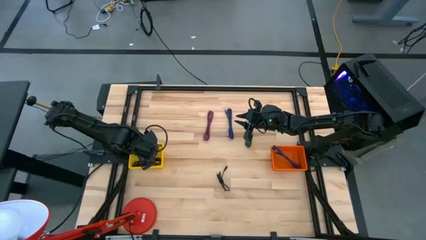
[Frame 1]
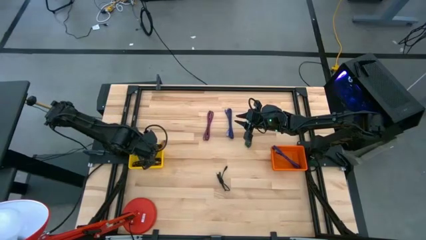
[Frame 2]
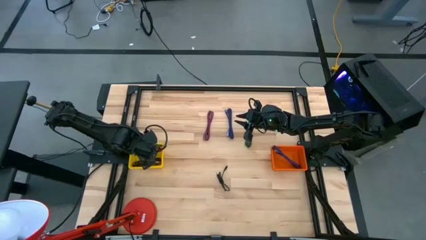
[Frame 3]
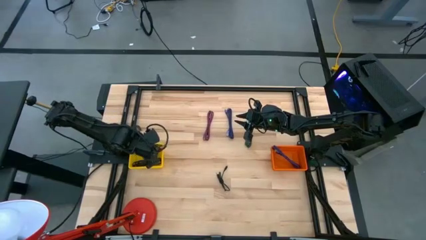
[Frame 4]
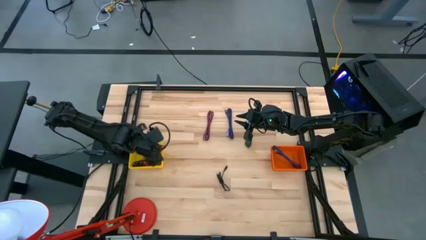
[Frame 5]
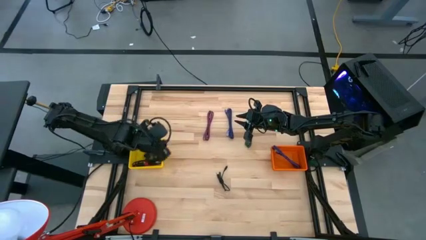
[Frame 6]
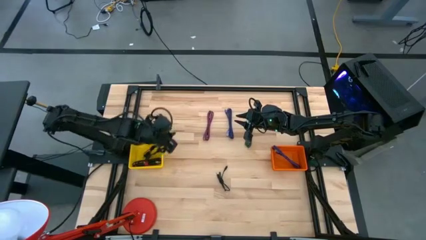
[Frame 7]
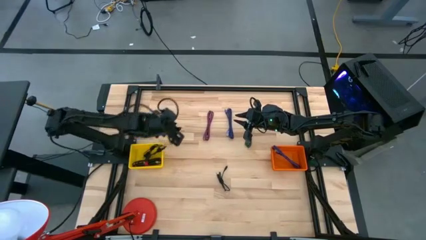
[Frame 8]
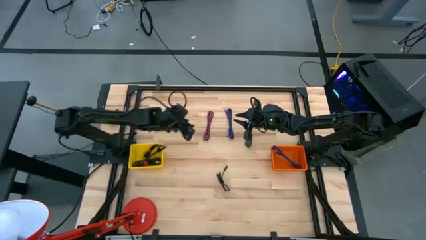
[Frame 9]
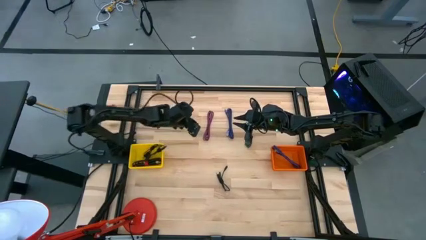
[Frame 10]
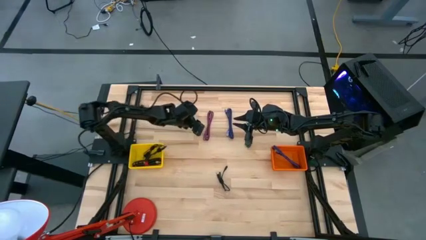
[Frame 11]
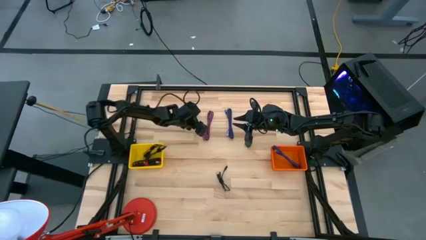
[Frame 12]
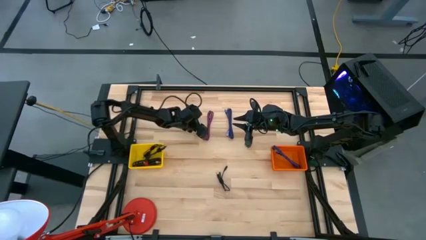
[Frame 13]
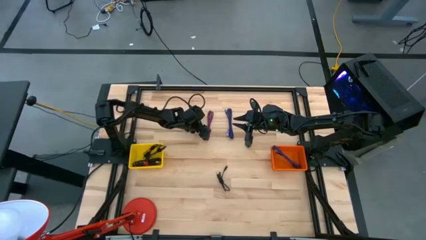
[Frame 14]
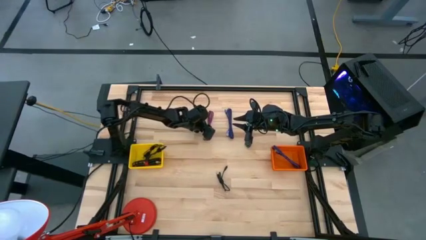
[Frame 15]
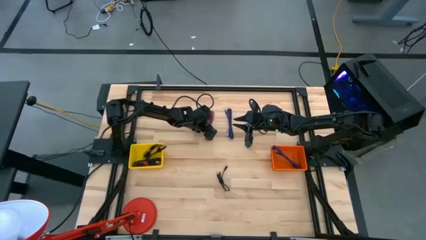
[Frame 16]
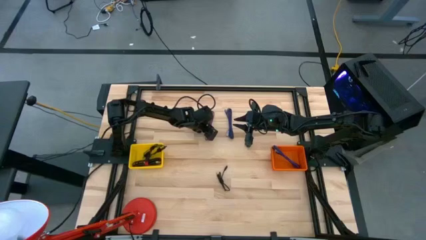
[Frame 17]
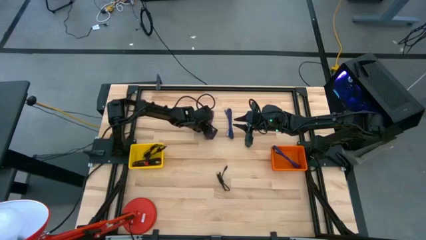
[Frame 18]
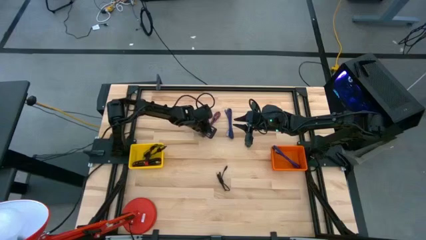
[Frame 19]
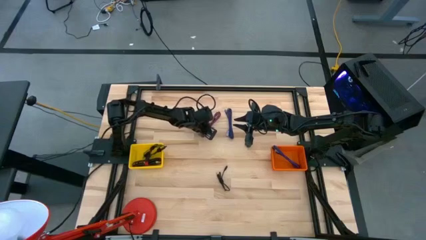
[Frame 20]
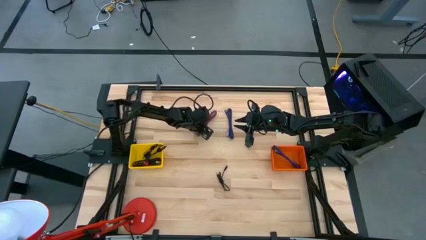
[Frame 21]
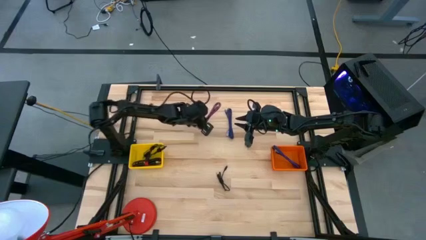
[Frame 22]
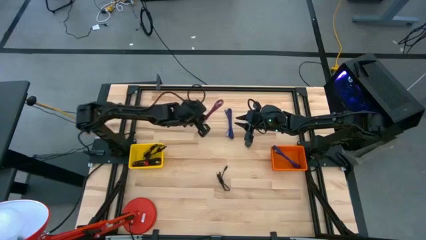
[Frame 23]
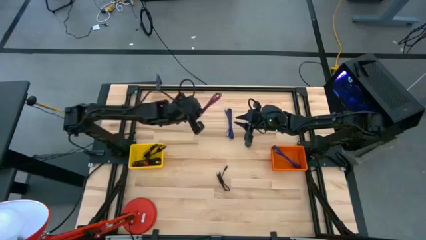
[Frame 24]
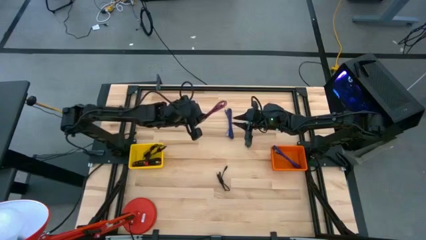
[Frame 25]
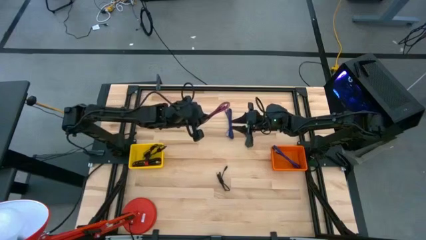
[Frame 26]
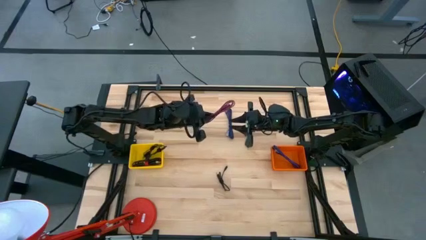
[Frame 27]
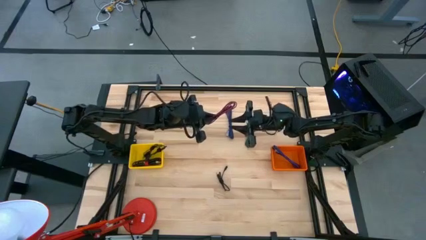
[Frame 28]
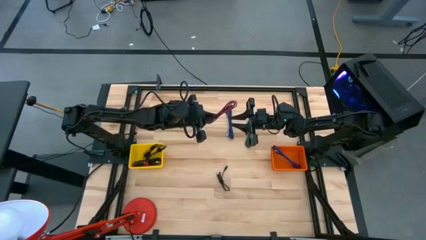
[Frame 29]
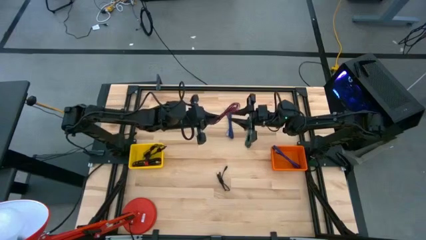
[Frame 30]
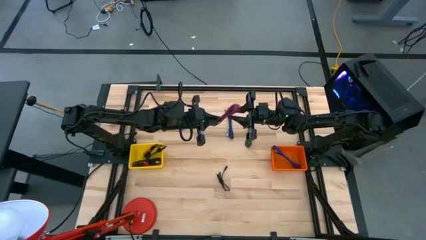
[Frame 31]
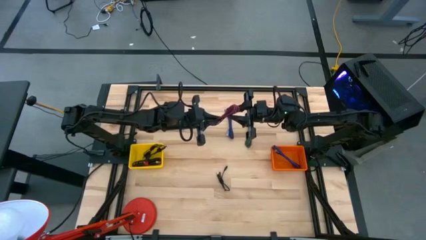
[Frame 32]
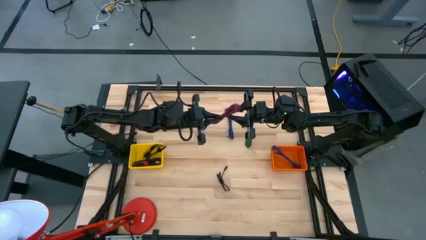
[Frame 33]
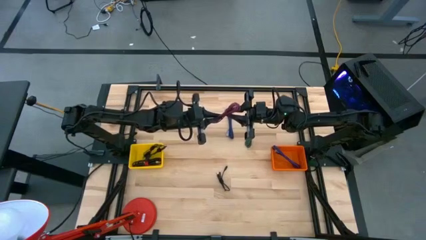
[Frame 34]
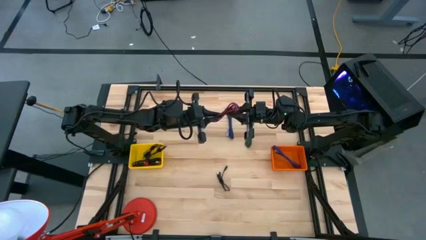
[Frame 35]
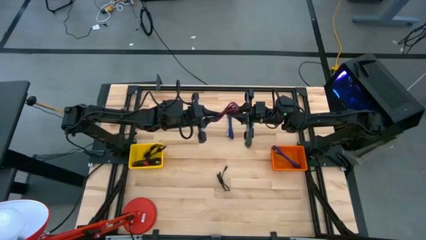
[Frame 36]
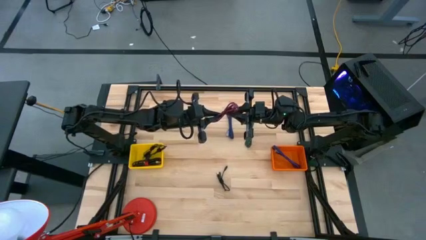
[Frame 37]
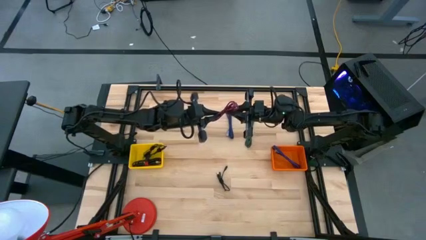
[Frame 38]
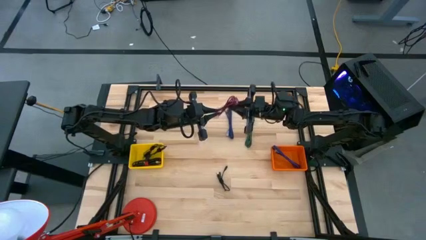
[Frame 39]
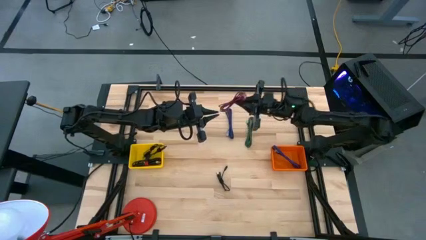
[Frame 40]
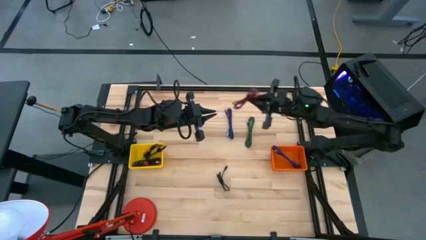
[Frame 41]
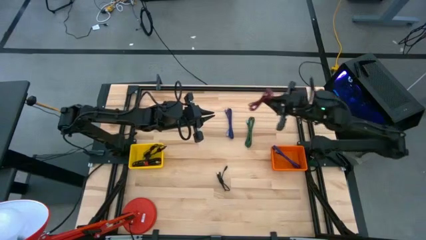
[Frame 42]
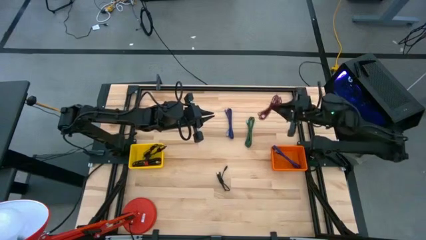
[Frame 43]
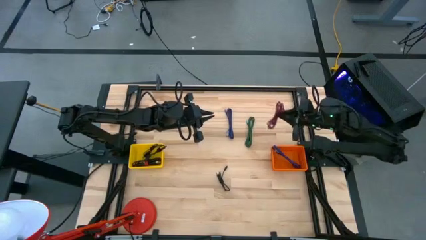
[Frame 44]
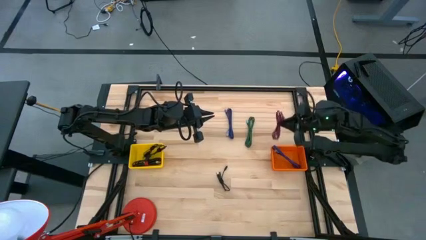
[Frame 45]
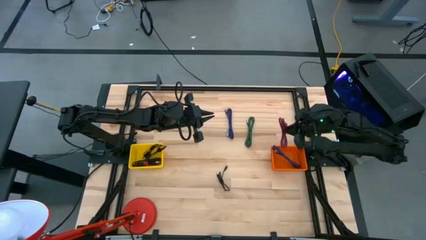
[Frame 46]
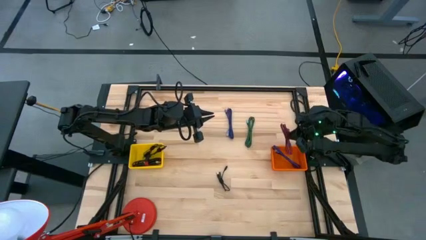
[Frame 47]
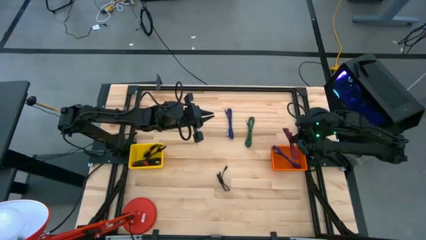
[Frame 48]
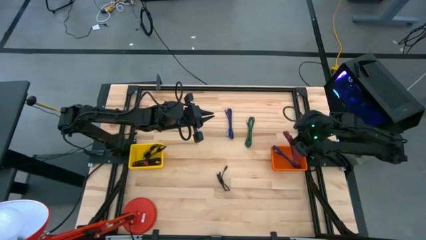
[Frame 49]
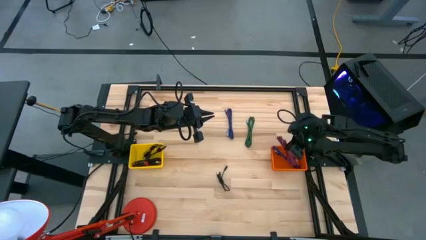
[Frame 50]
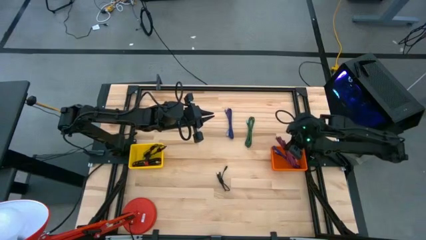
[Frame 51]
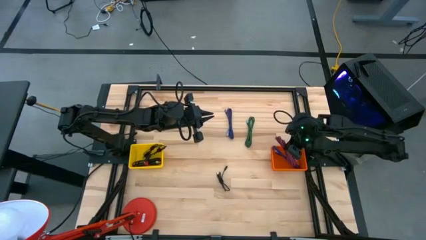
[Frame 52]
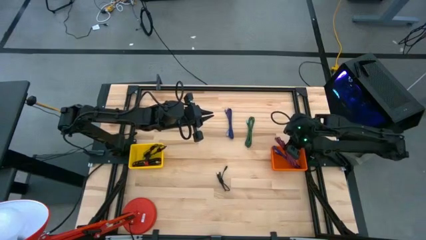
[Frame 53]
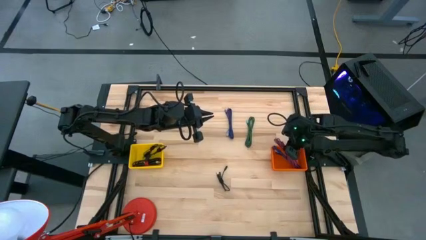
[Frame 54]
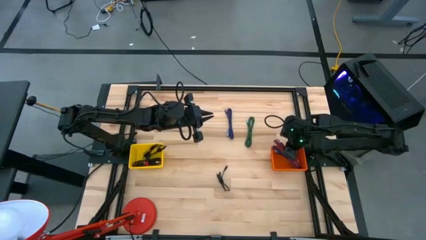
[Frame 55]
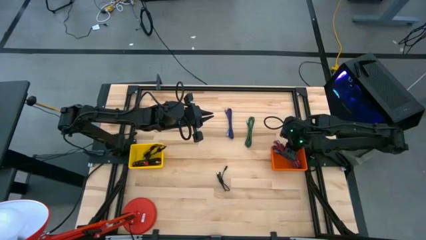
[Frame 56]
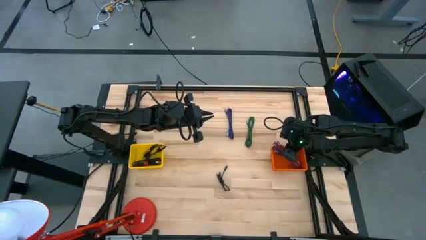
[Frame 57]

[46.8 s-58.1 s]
Task: Pick & Place USB Port
Put the pink USB cable into the orange bin

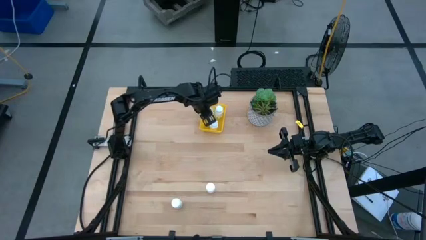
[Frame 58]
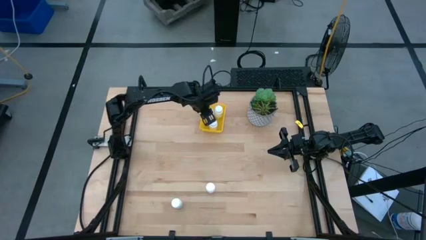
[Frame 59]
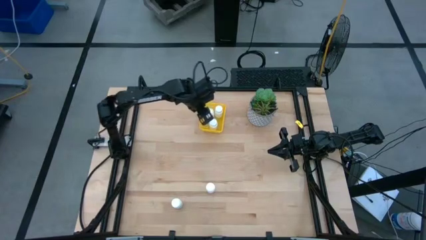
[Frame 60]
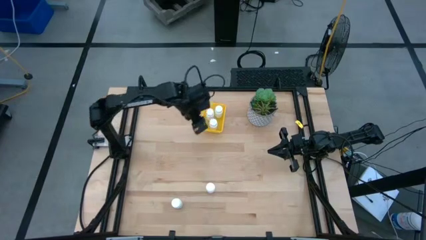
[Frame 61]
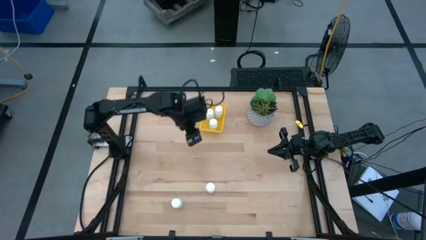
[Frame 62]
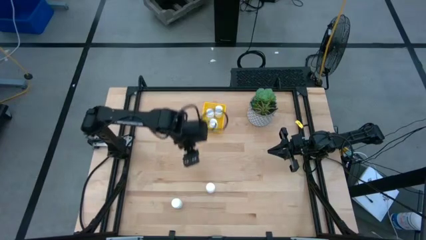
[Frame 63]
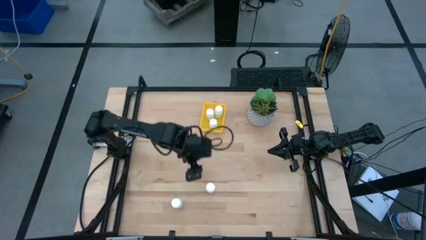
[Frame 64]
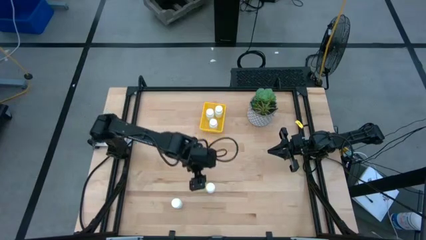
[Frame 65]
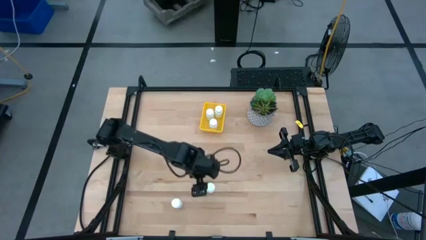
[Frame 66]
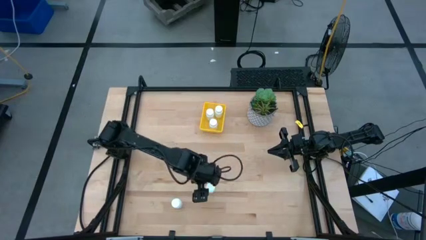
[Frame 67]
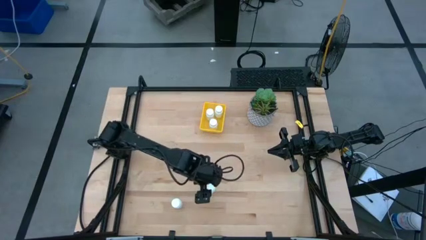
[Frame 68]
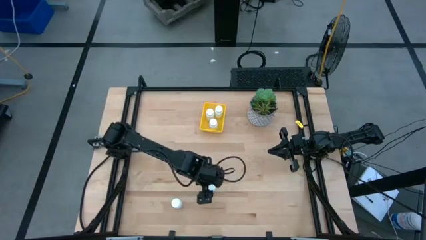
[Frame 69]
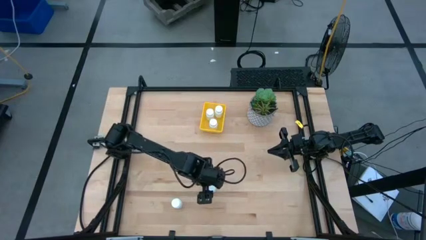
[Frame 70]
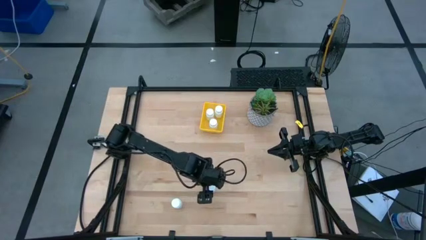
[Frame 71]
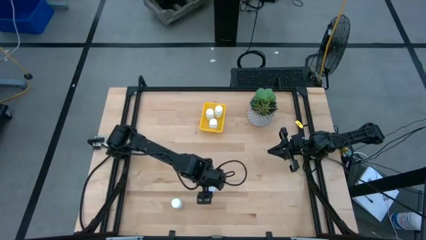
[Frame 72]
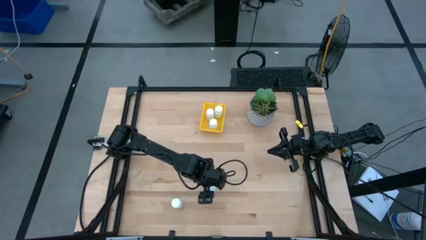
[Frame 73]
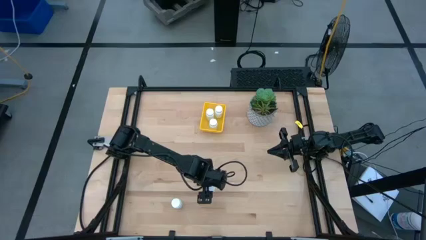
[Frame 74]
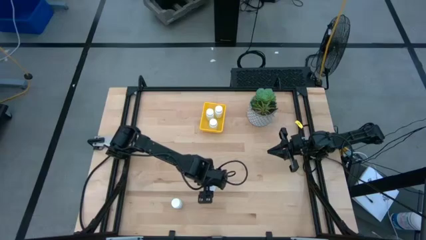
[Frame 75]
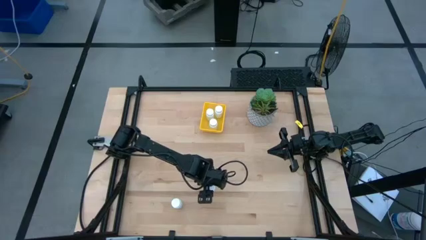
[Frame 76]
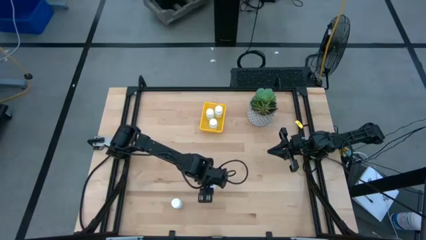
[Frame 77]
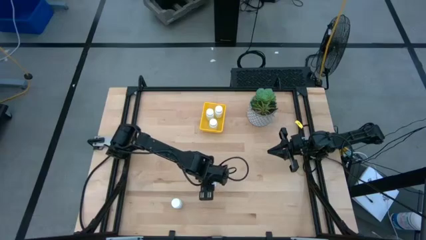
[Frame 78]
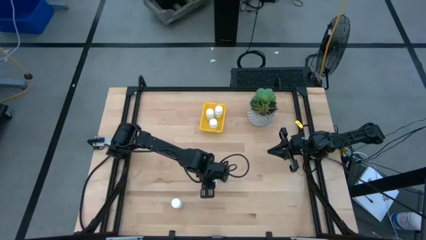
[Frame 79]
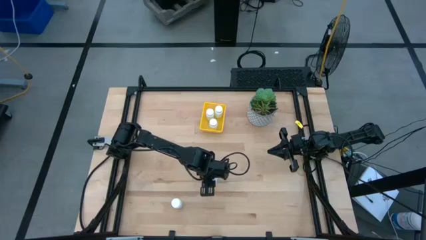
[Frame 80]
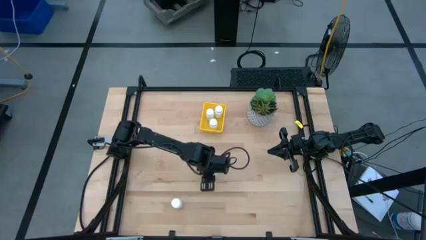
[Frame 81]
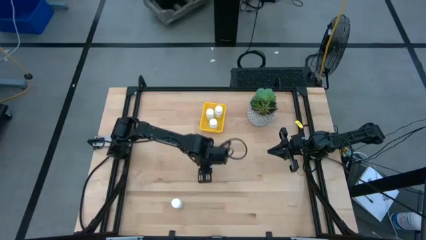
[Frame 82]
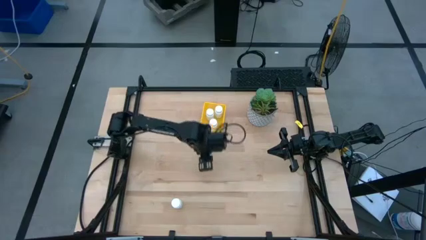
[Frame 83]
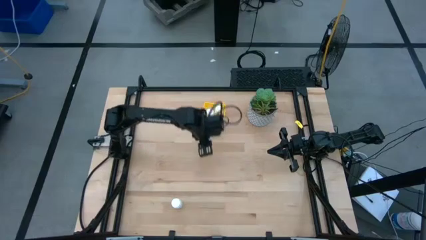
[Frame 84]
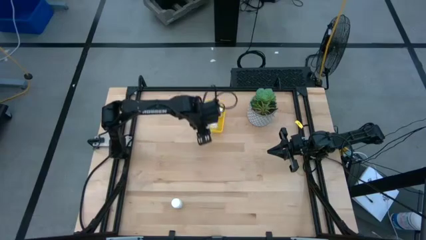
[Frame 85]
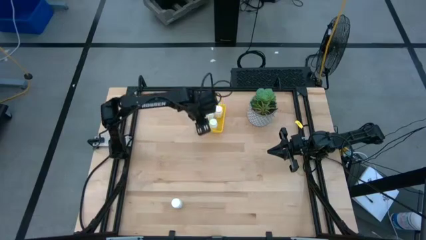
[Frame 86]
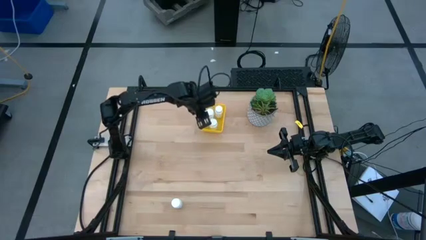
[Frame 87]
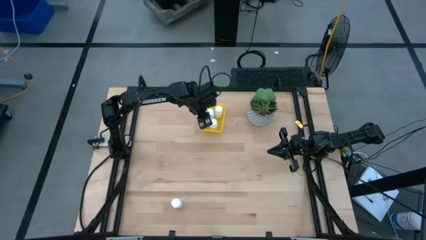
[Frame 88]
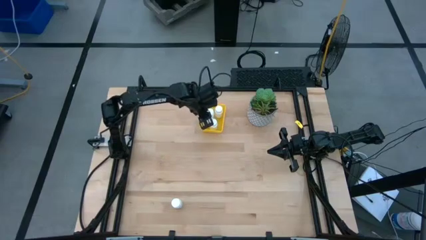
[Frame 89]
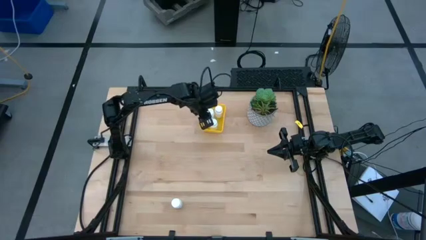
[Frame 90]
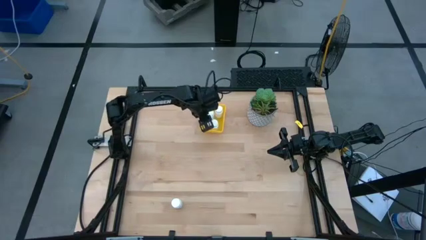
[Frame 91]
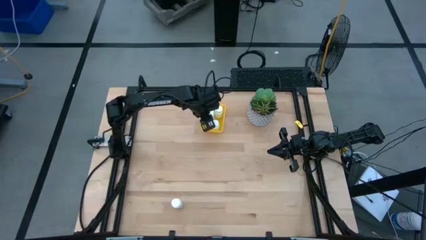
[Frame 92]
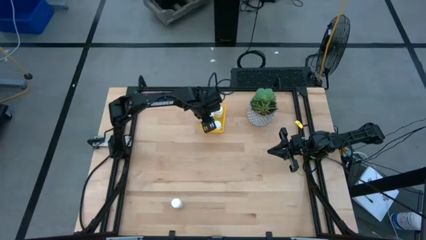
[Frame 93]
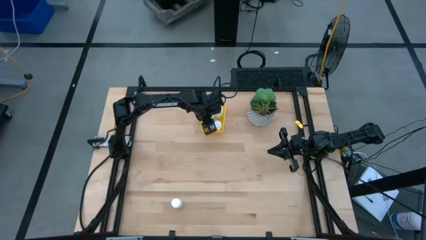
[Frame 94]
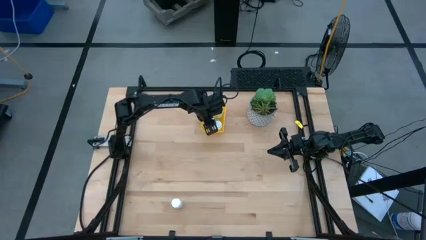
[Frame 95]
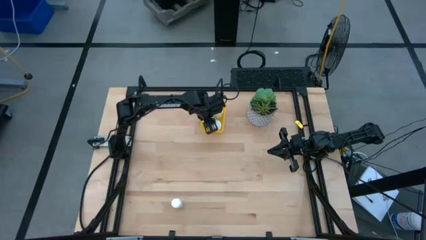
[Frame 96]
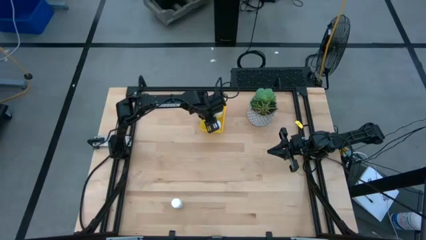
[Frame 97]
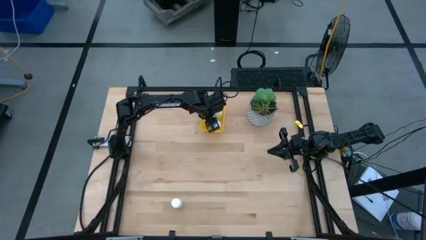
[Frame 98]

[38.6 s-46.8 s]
Task: Pick and place pill bottles into a basket
Put the white pill bottle into the yellow basket
